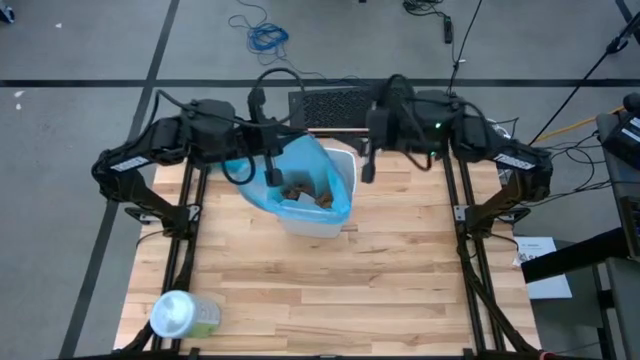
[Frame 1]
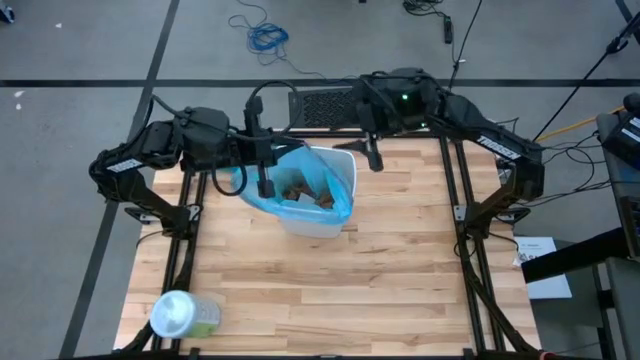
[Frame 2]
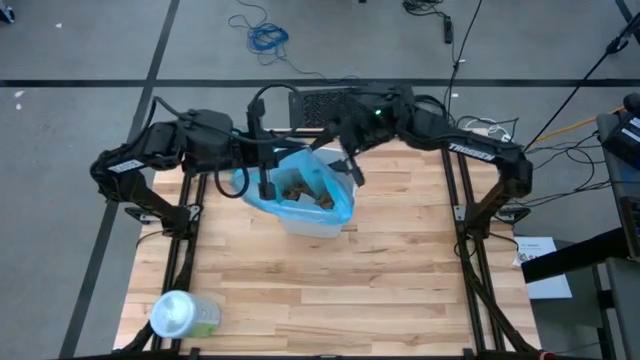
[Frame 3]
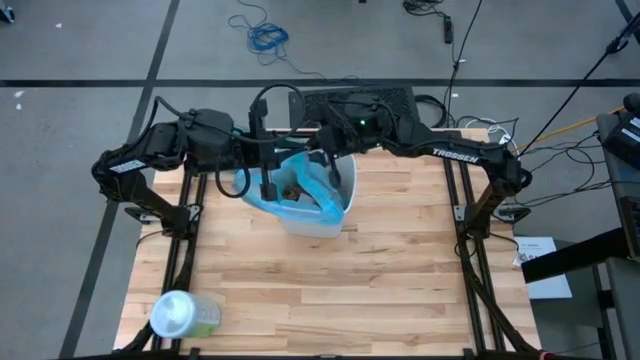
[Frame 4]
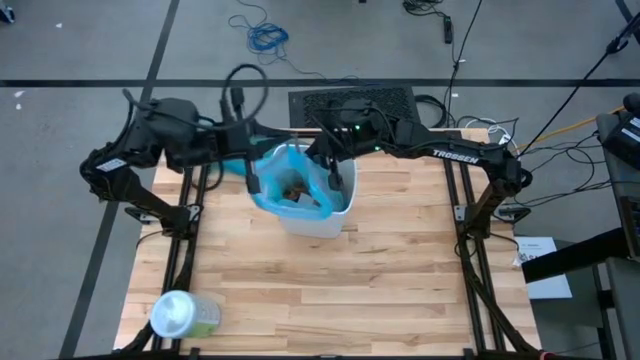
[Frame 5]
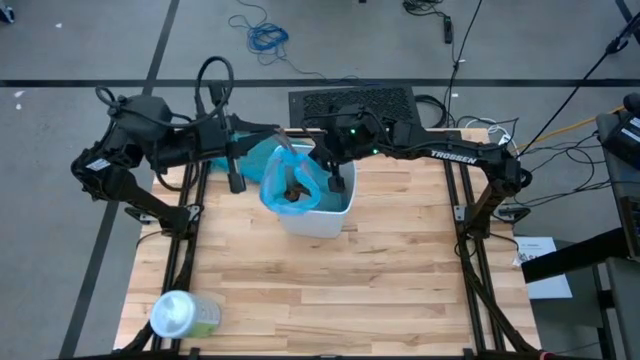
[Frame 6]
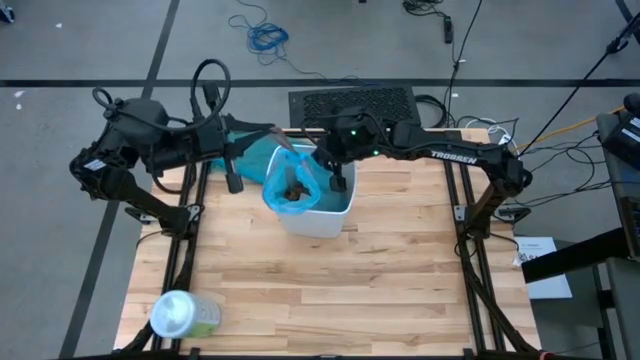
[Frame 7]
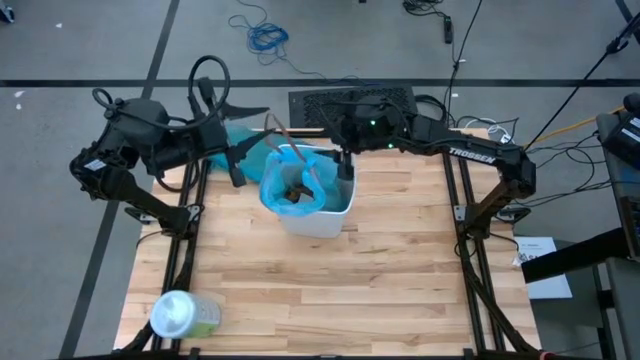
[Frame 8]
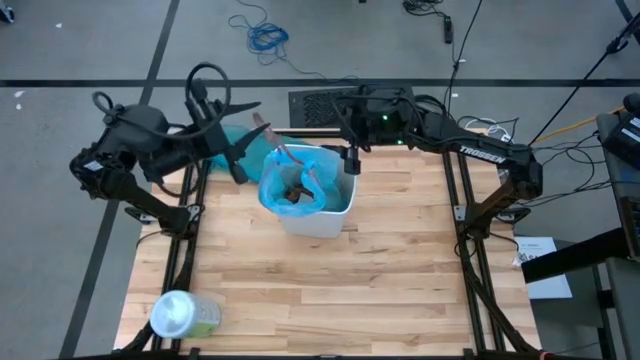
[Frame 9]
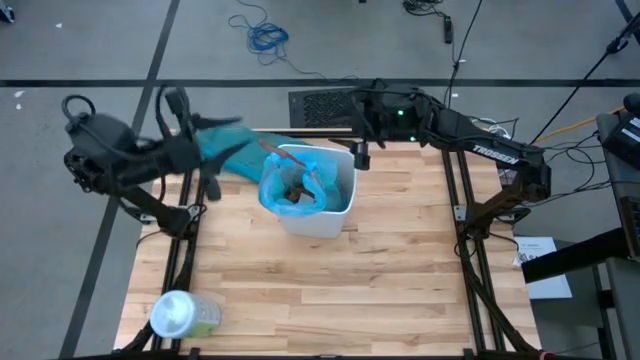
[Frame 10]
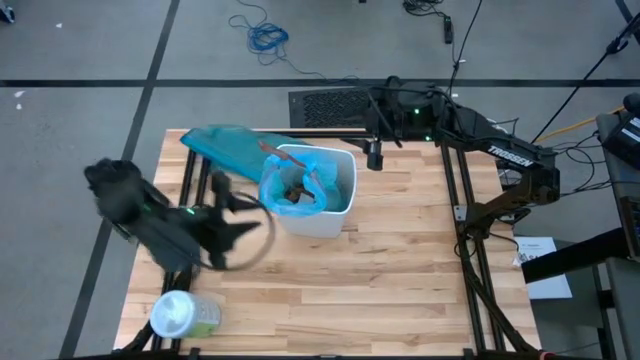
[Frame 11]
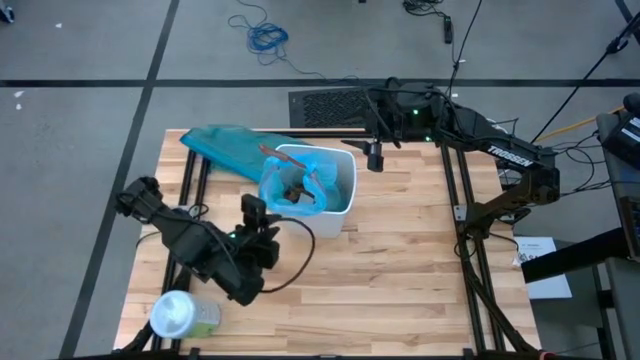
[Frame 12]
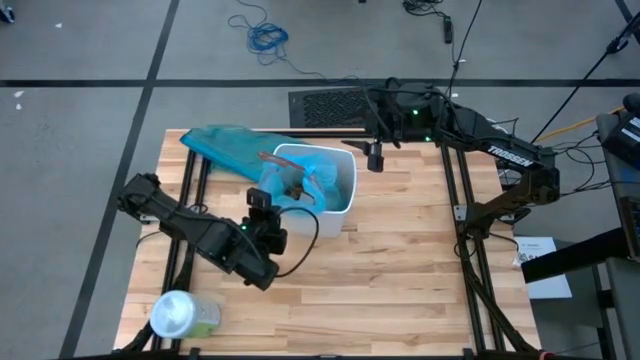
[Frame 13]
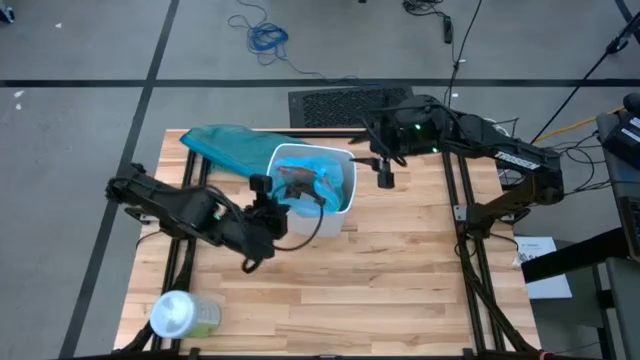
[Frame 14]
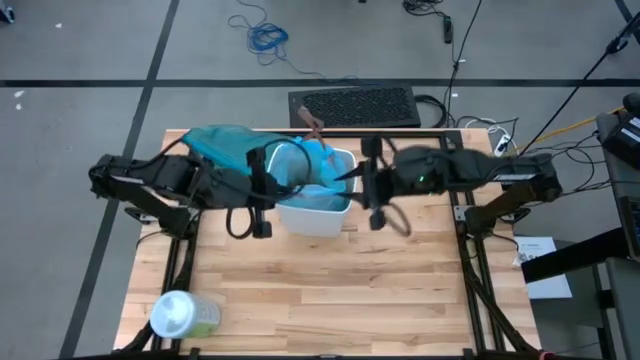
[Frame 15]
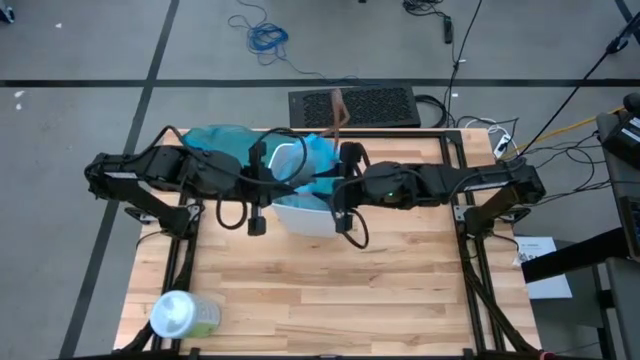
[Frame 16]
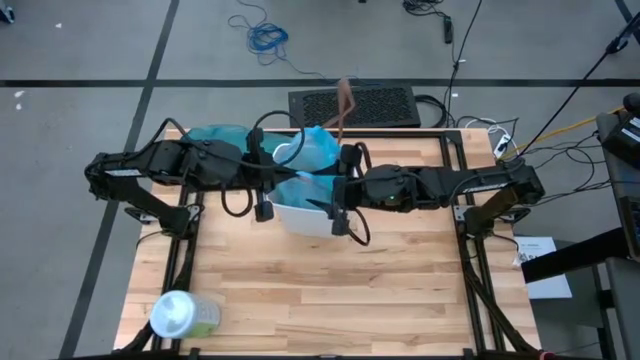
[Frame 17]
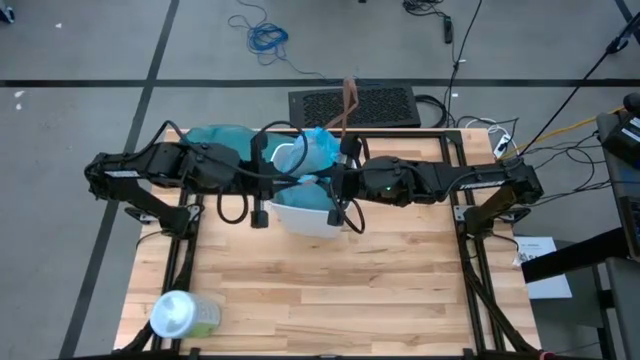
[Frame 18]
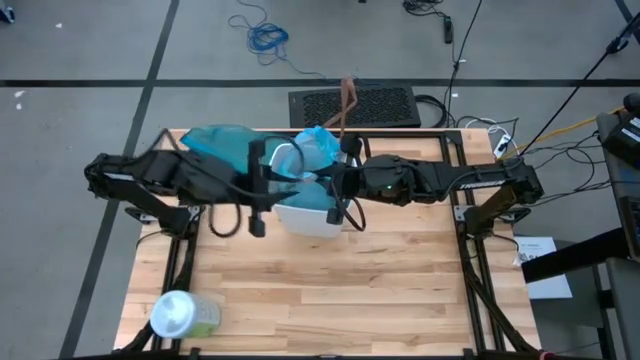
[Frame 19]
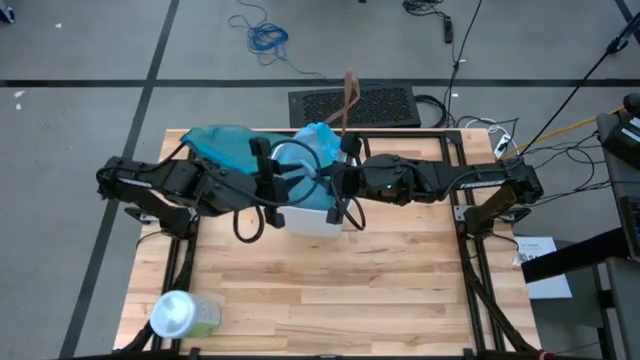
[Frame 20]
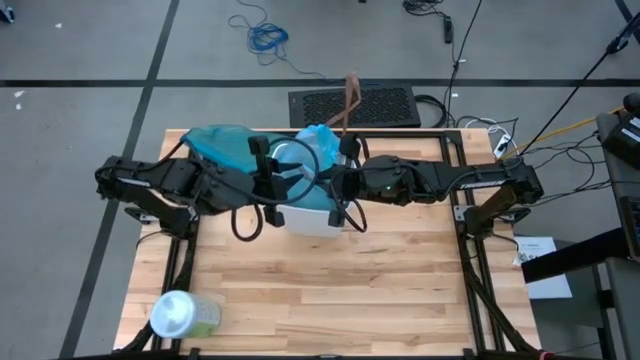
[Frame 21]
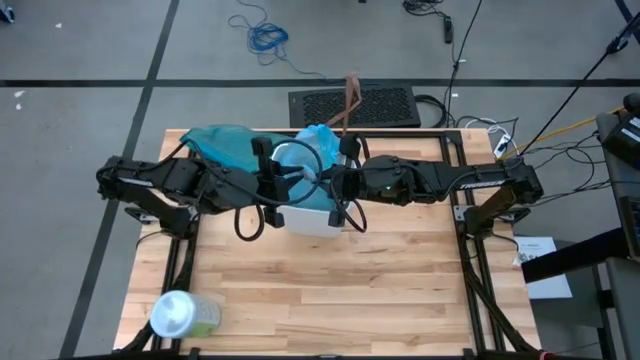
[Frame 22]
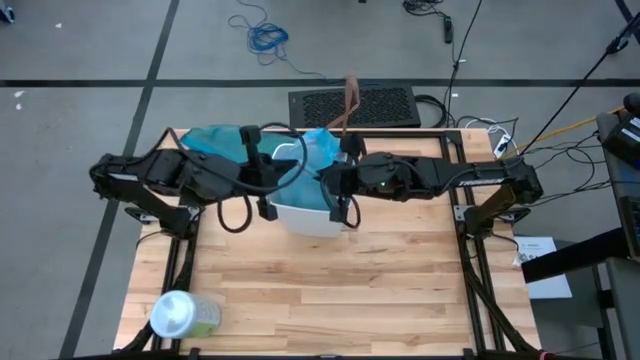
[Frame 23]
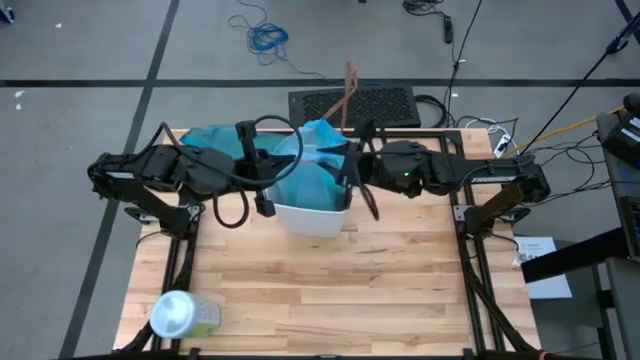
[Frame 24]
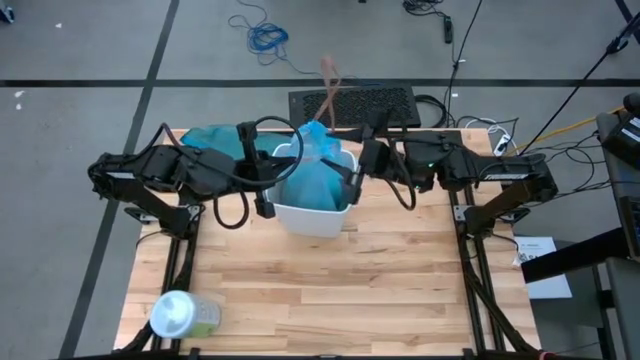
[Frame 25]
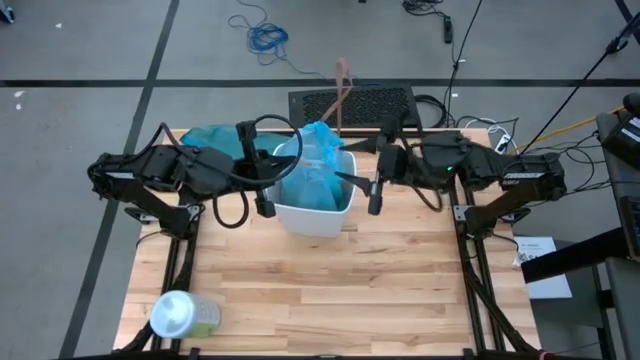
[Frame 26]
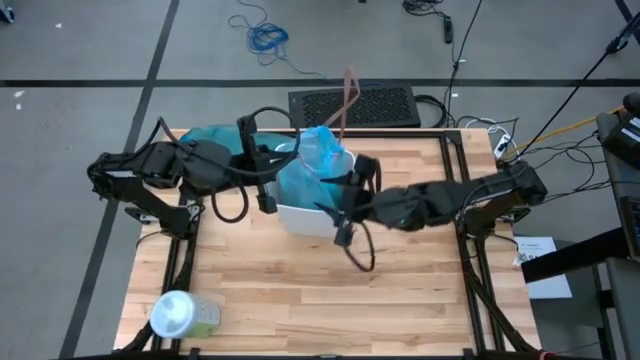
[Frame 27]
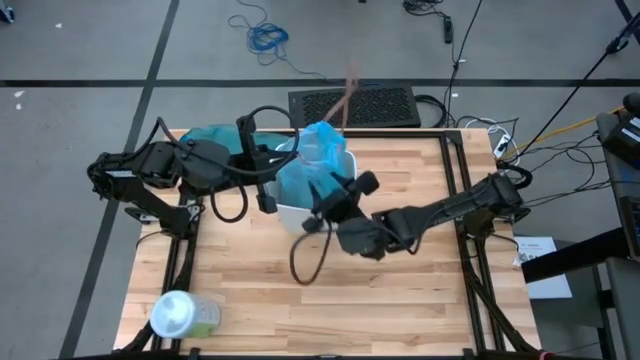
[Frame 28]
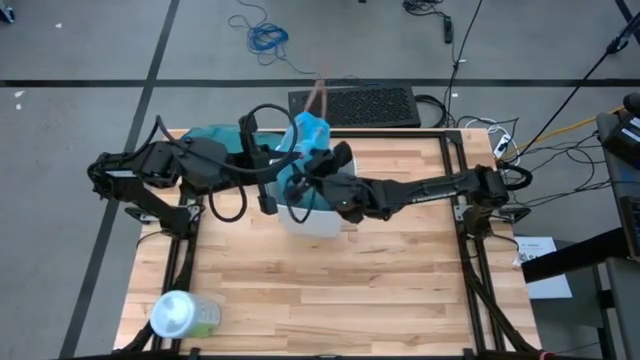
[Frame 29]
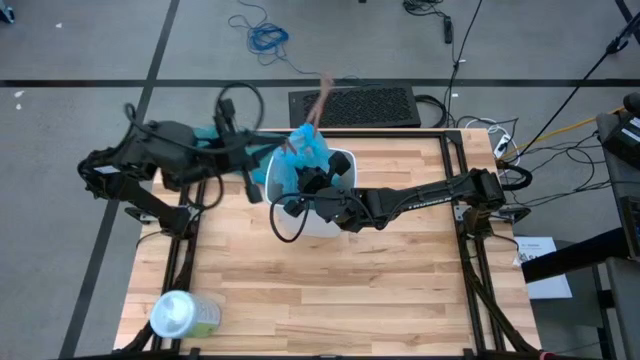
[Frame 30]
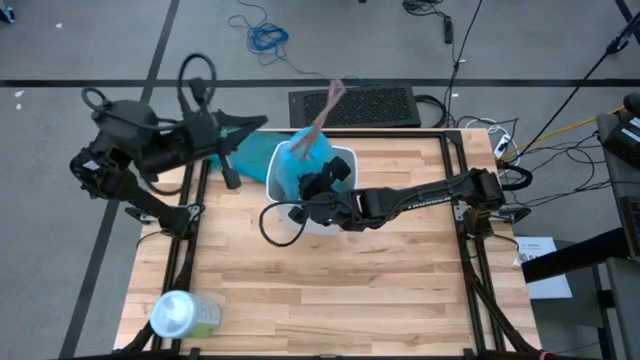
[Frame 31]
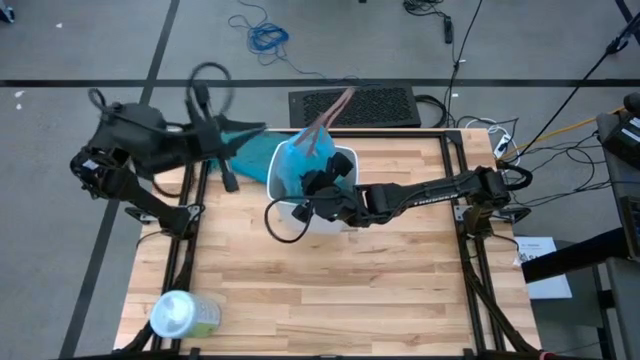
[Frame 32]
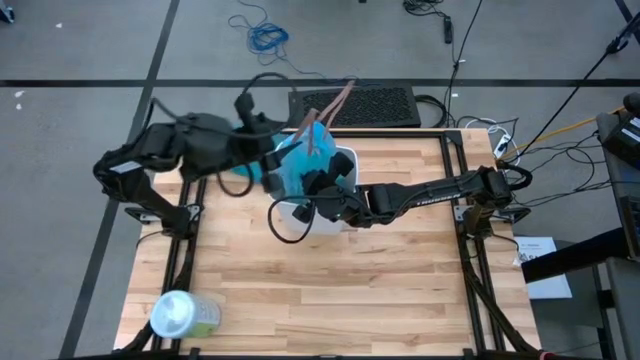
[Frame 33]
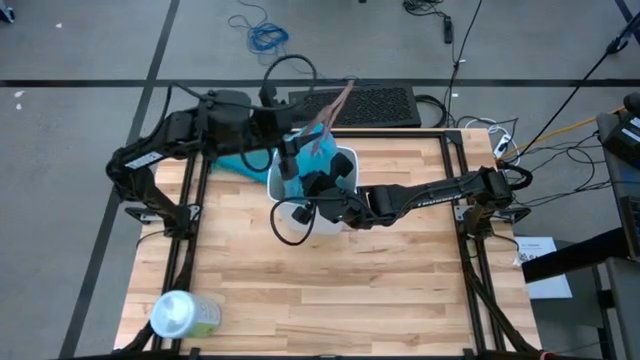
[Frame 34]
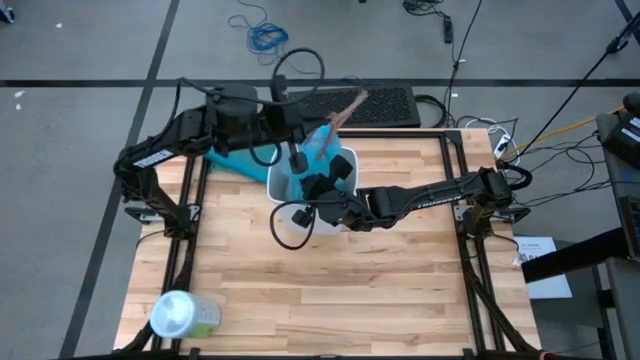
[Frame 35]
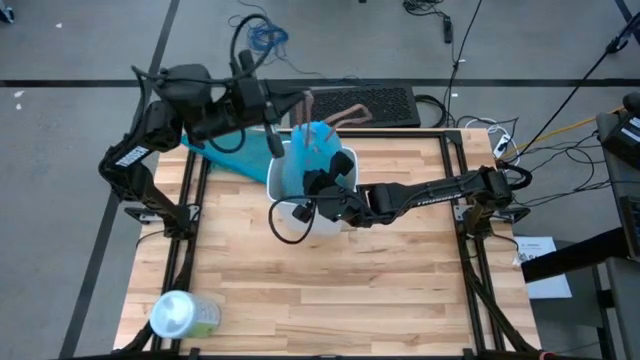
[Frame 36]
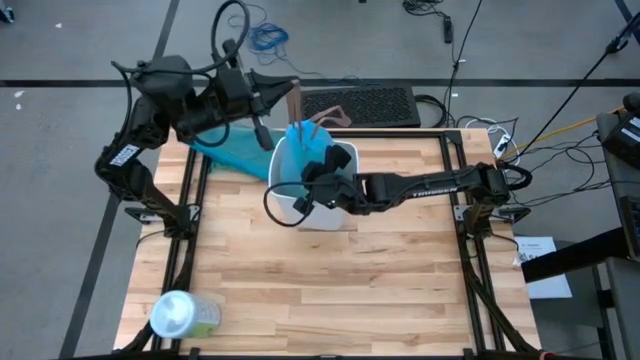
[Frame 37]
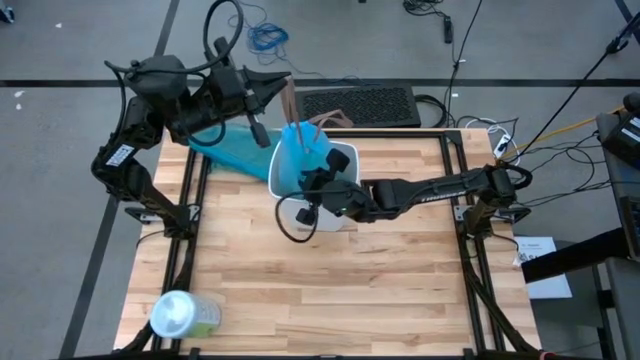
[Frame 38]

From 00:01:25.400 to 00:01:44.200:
Task: place trash/remove bag and relplace
Close the light blue trash bag

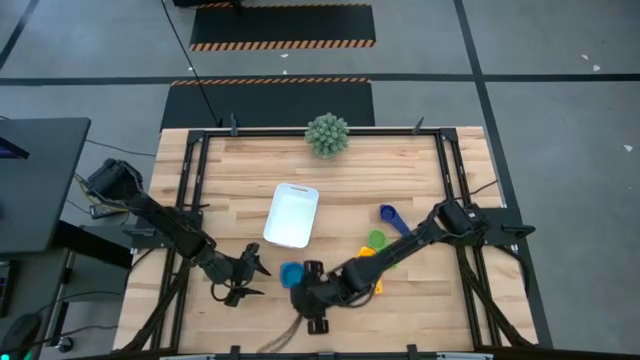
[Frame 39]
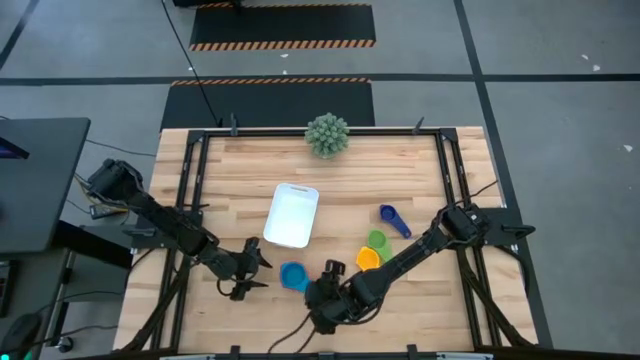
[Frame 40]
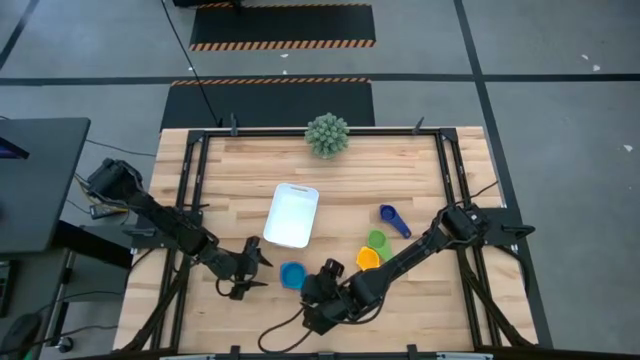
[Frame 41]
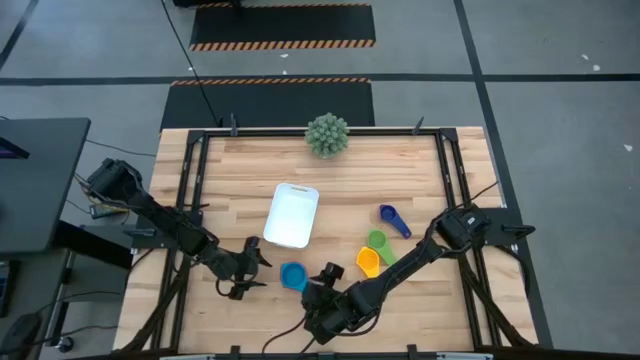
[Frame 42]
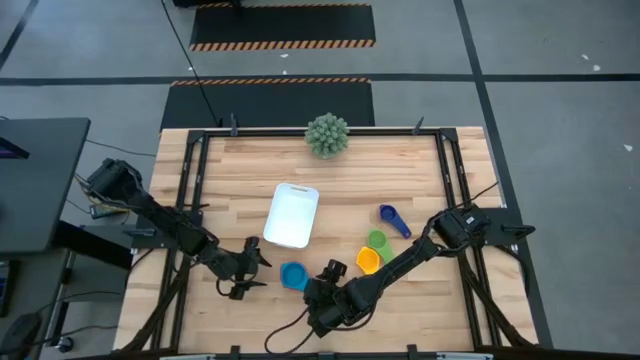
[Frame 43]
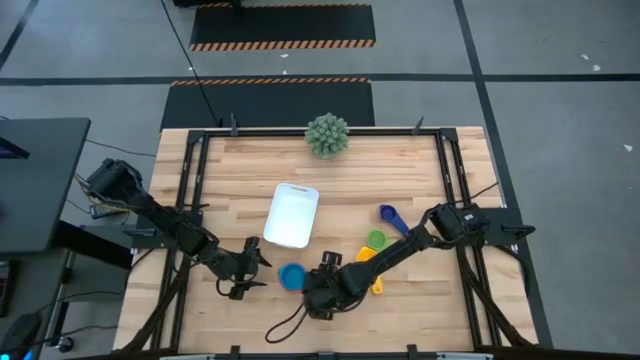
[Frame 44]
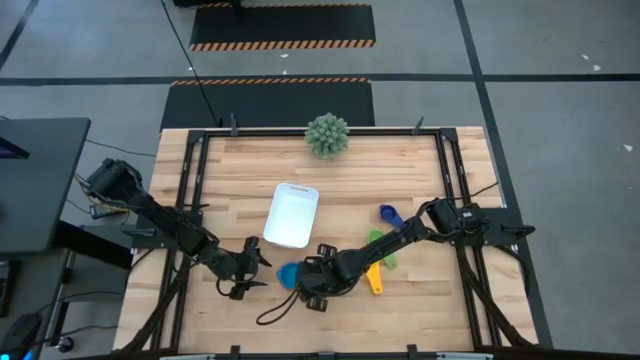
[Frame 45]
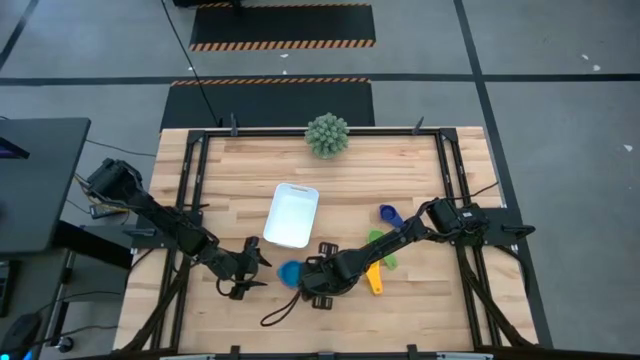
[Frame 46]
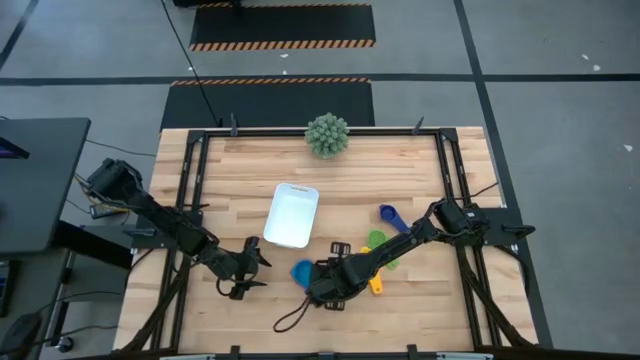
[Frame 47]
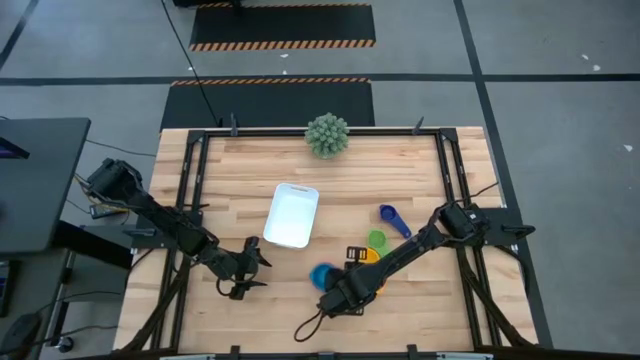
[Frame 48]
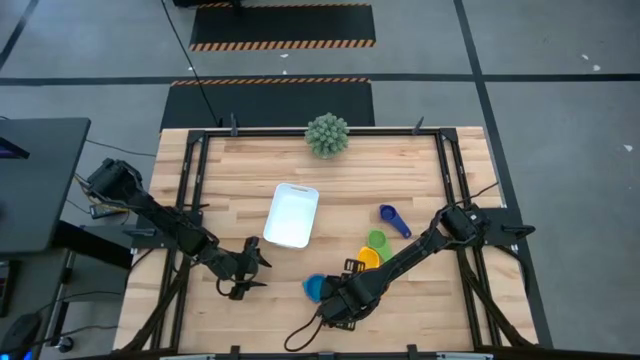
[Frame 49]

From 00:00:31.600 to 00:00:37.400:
Task: Nest measuring cups in basket
Adjust the stacked measuring cups
